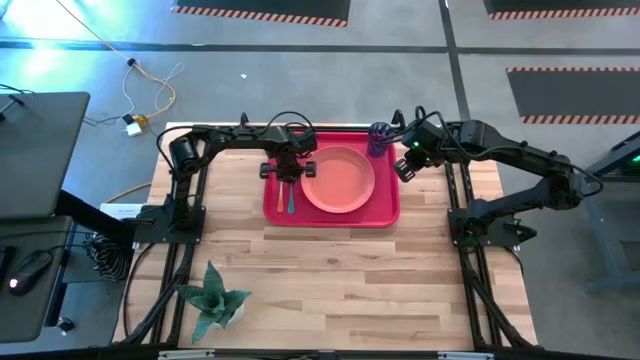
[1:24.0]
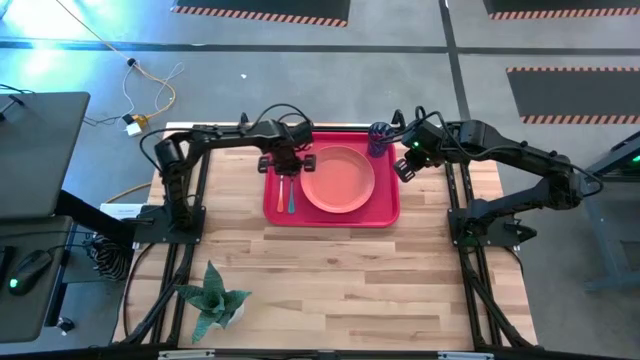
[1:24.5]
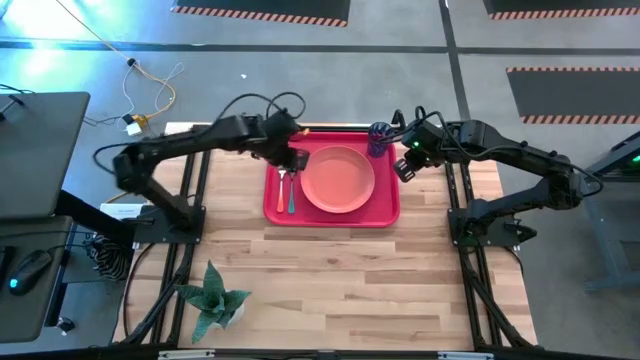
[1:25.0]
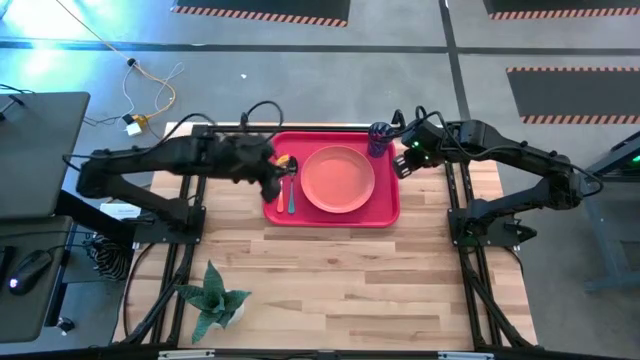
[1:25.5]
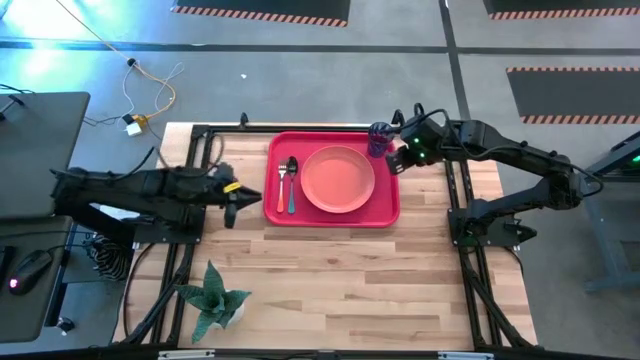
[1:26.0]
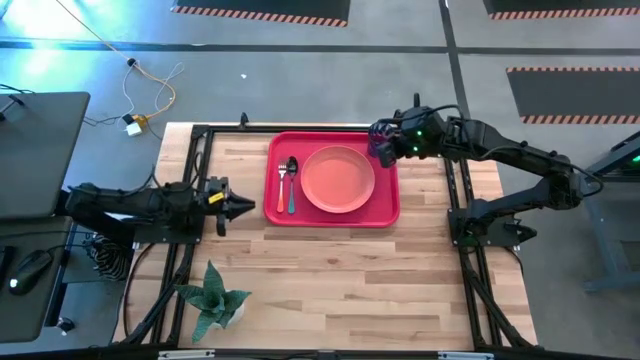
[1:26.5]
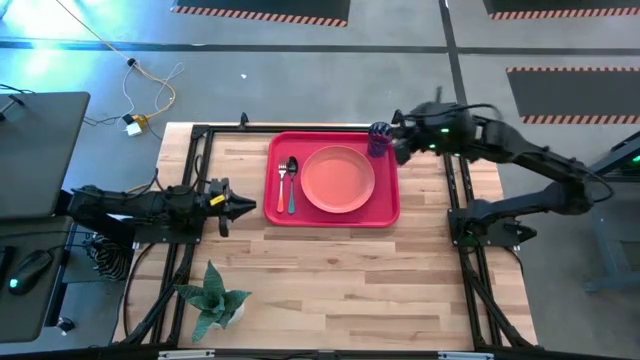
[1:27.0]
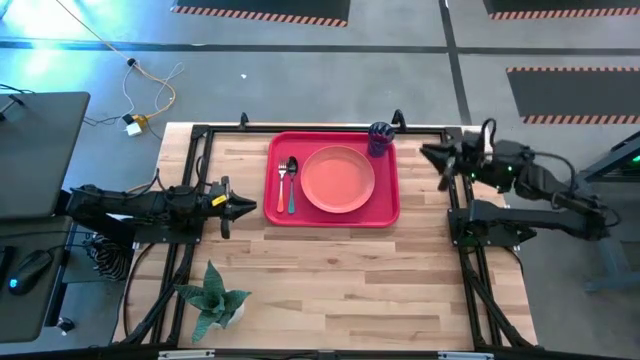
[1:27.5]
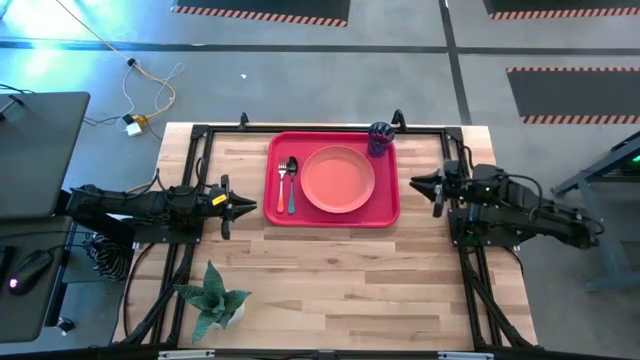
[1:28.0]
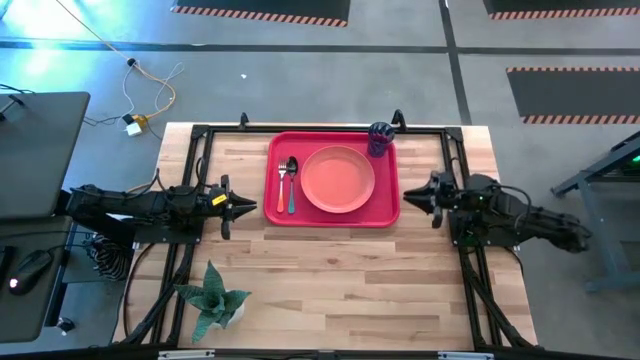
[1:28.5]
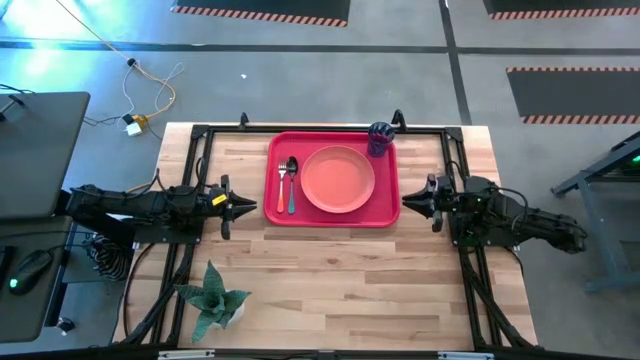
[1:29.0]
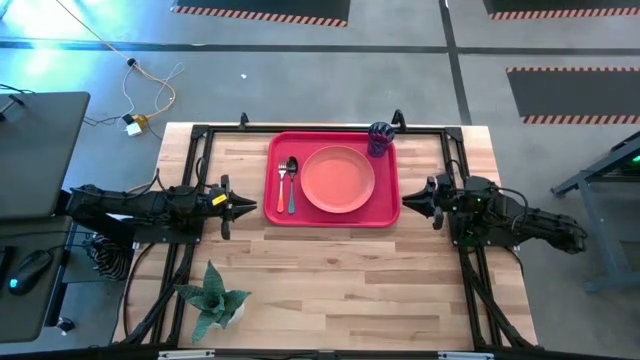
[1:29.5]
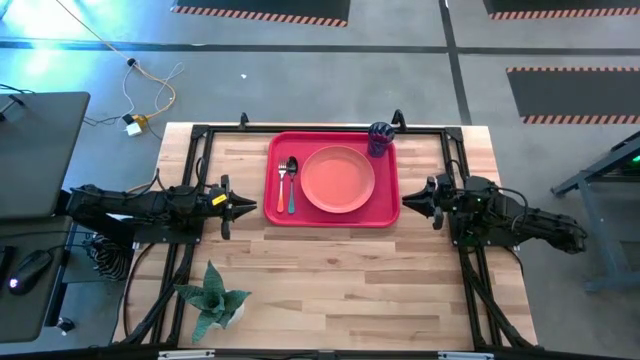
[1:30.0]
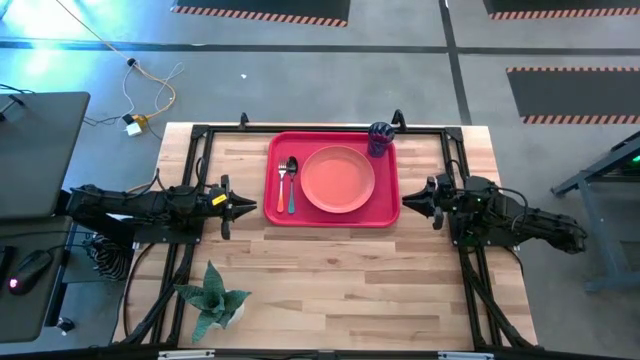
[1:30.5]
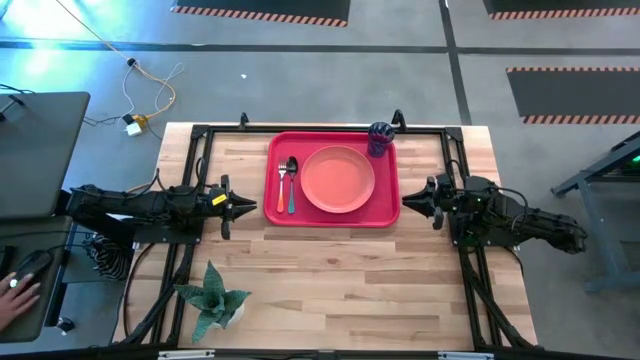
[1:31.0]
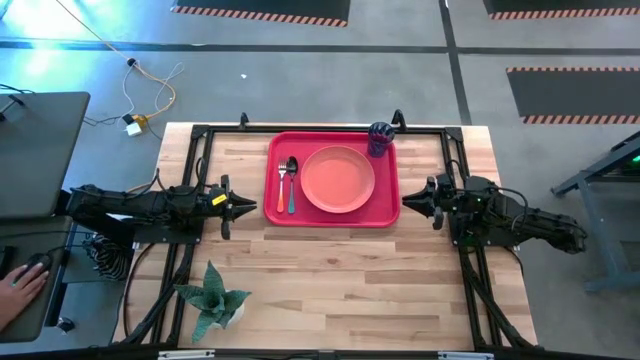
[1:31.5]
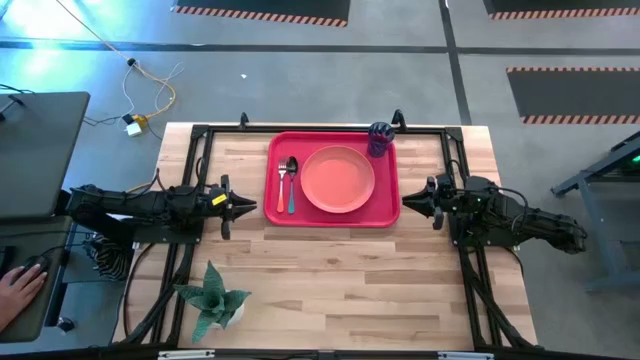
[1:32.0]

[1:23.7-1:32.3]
Task: Pick and place plate/cup/fork/spoon on tray
Return to Home Position

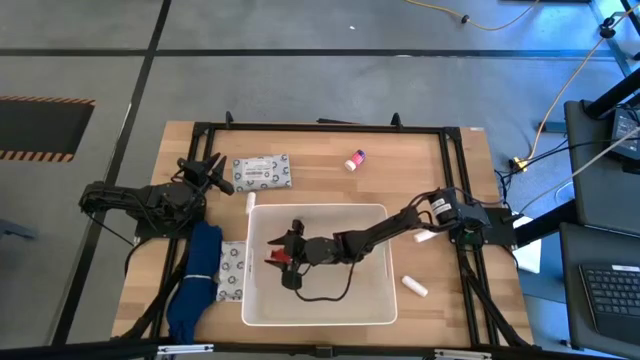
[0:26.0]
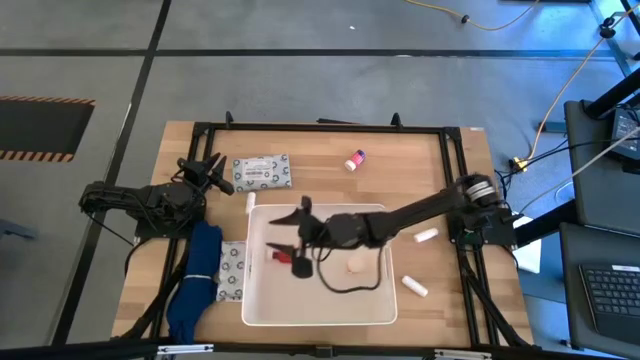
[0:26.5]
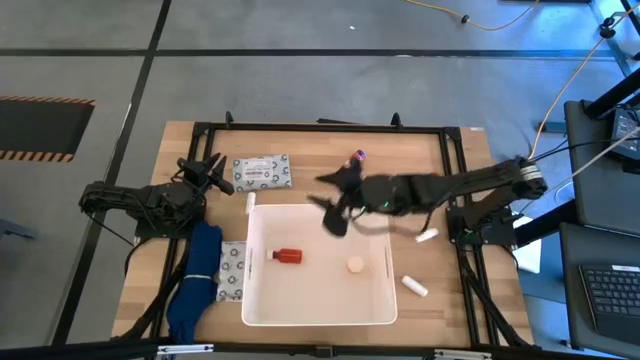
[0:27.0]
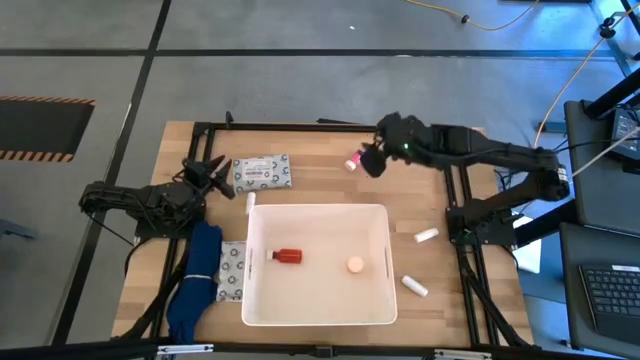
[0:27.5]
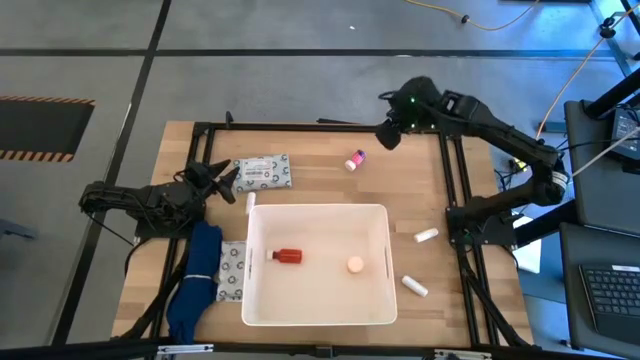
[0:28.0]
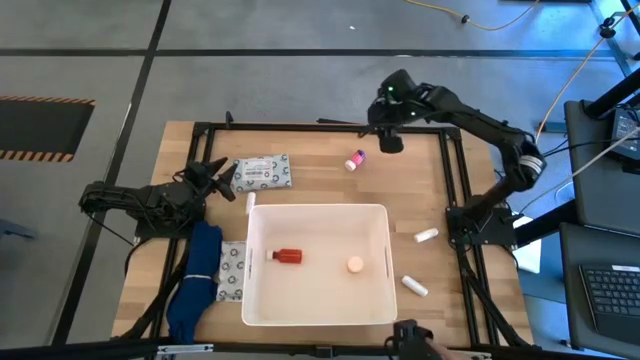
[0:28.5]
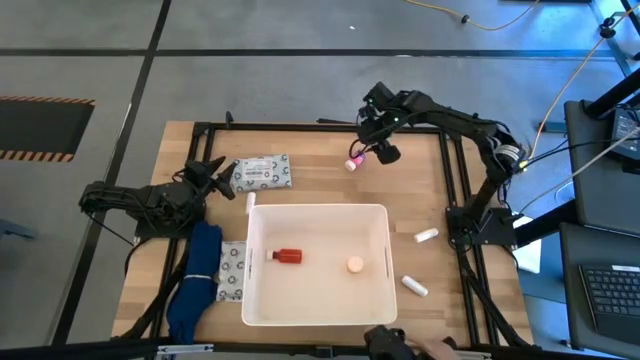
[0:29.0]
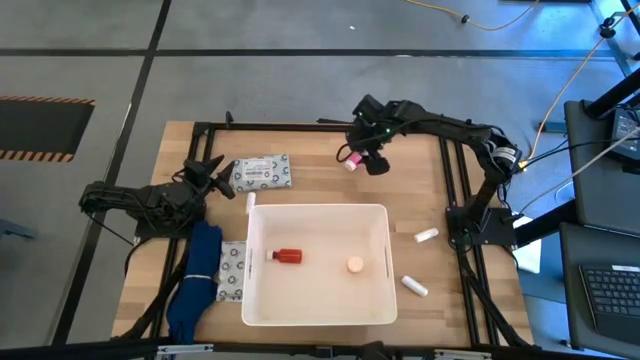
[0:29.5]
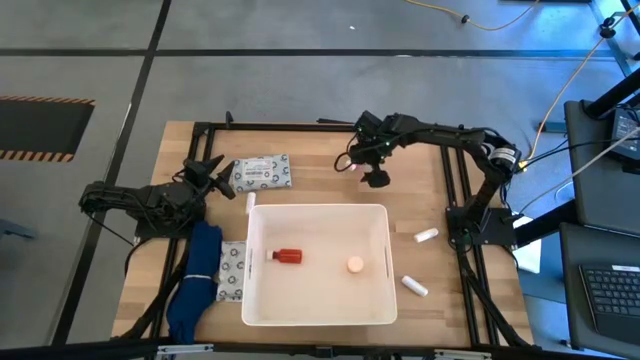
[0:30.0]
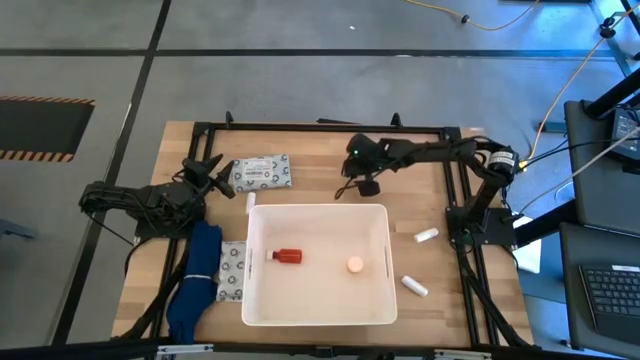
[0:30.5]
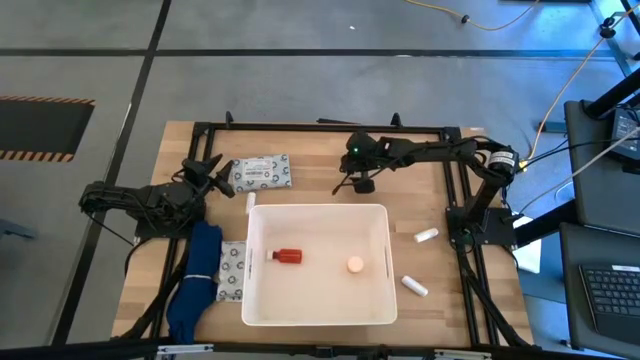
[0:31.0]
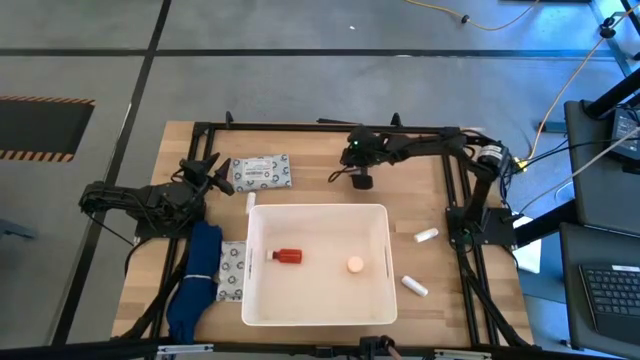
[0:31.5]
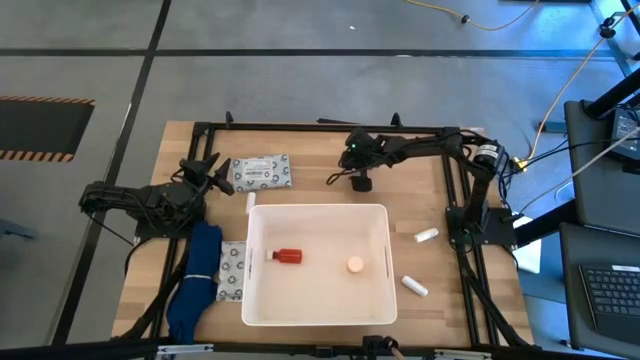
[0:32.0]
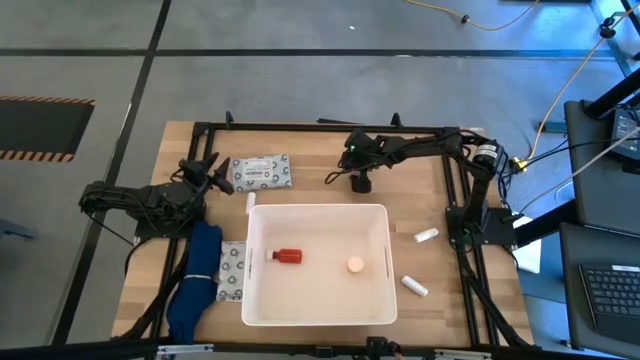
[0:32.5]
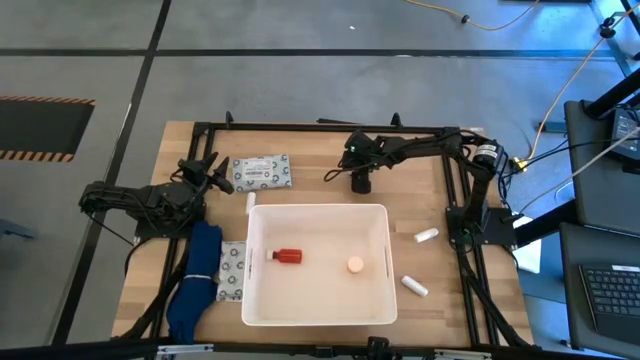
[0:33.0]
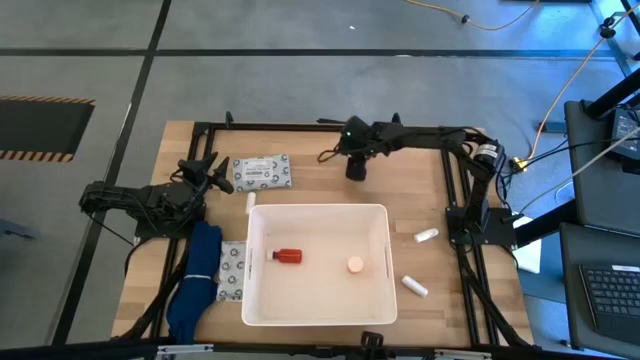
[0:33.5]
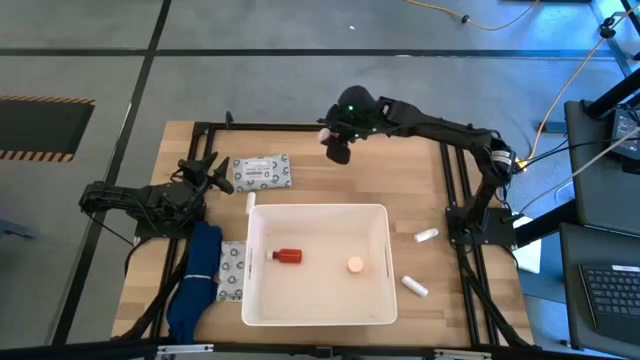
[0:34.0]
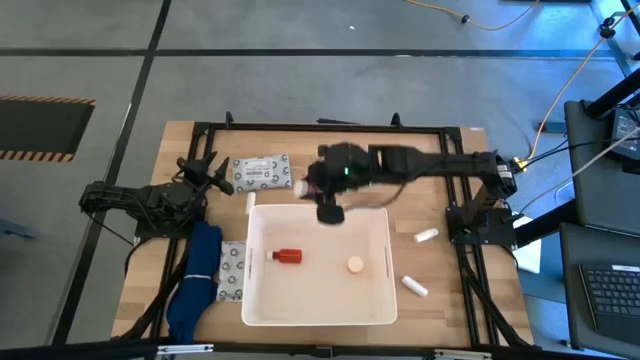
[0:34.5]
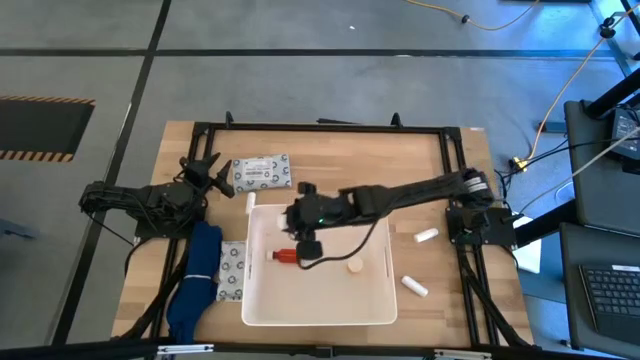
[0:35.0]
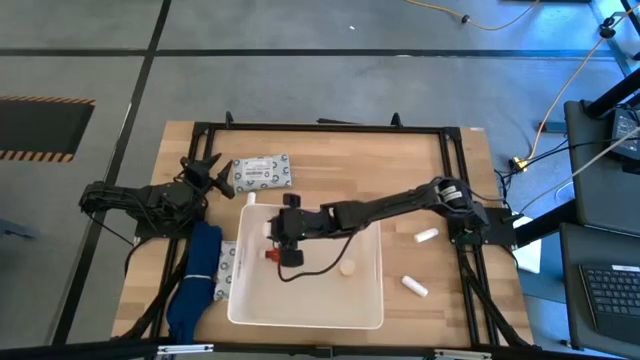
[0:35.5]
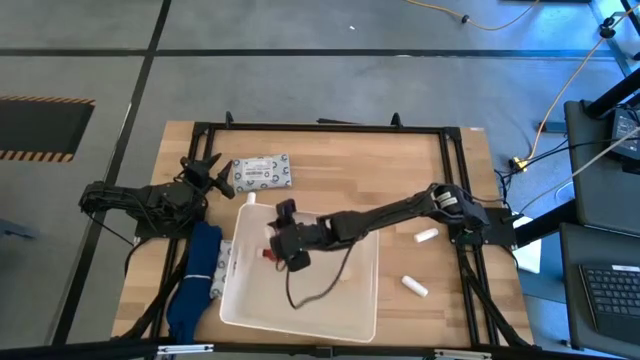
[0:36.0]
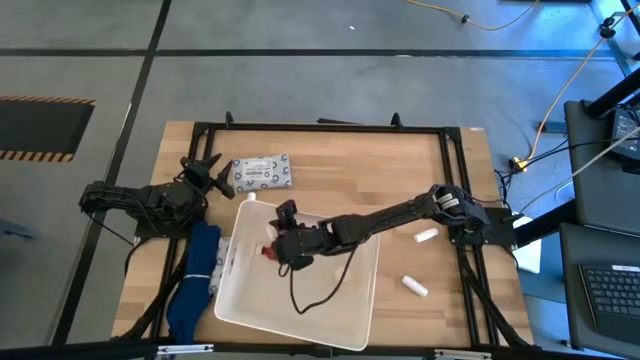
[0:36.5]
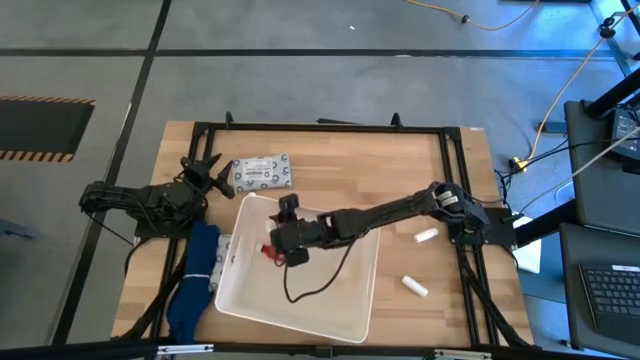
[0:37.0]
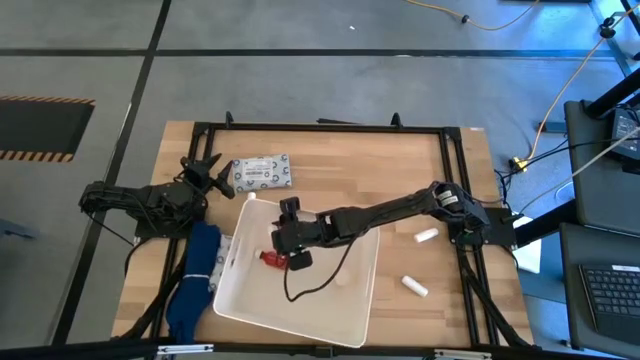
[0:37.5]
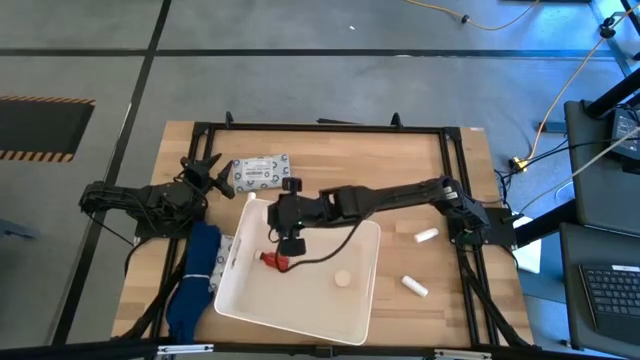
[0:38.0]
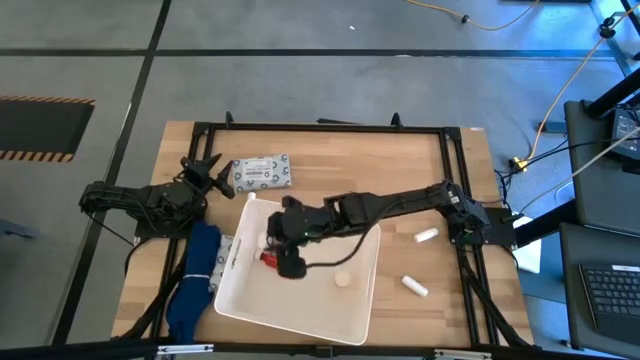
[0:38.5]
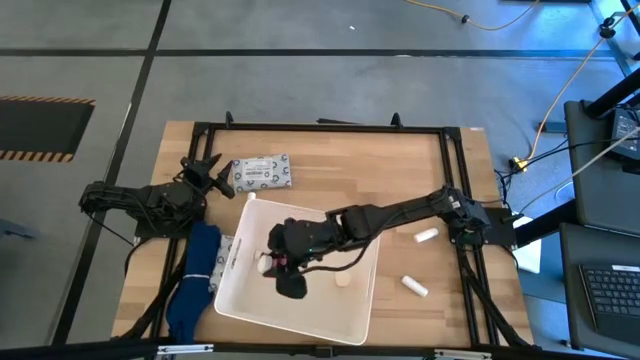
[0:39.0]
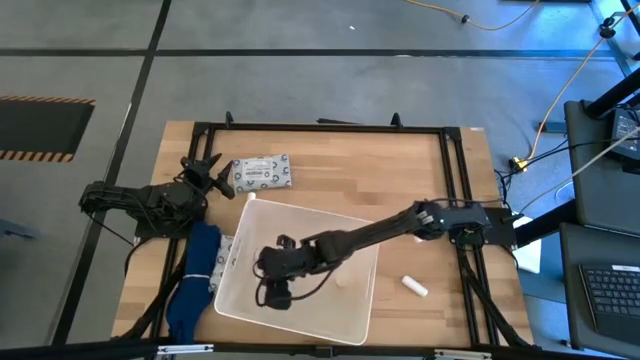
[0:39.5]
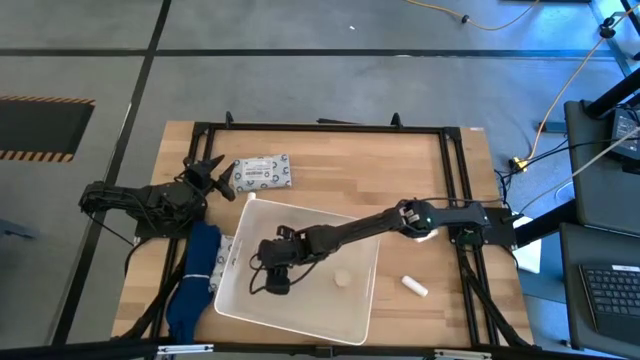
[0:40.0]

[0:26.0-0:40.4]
Task: Pick & place medical supplies in basket/bin
Put the pink pill bottle into the white bin
